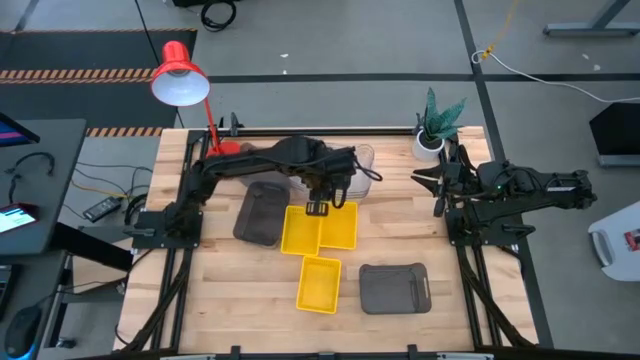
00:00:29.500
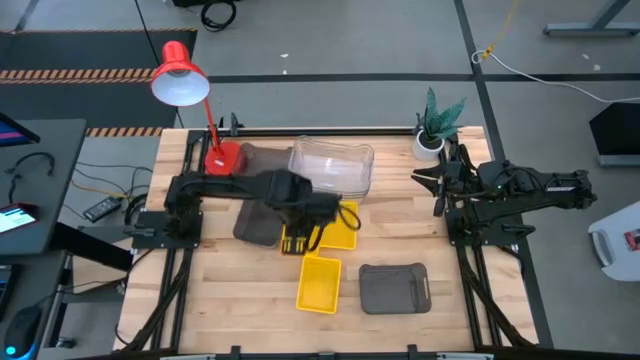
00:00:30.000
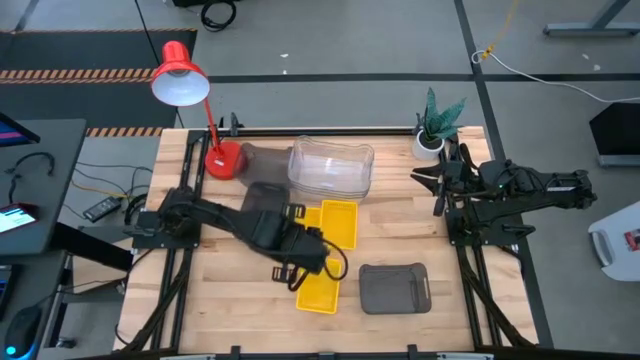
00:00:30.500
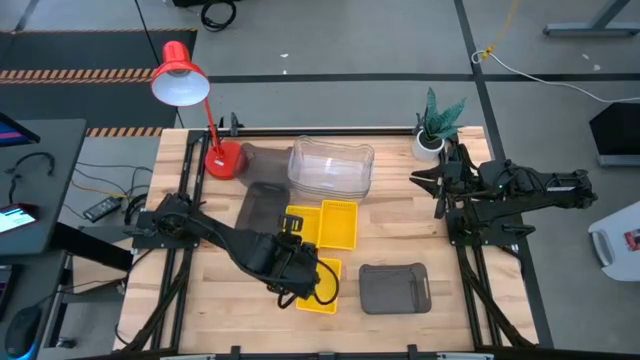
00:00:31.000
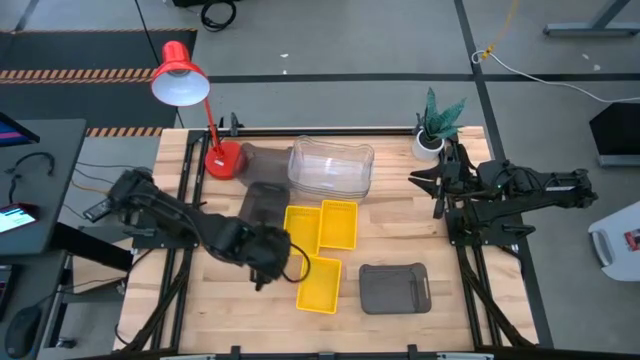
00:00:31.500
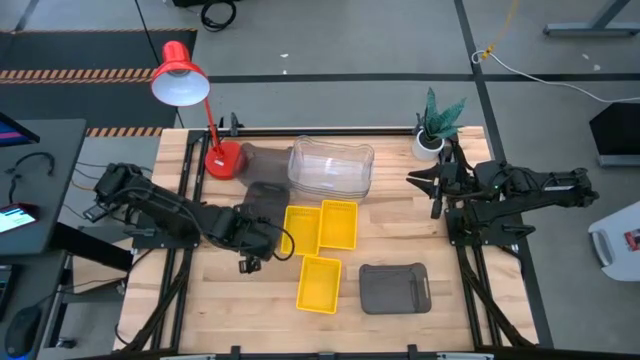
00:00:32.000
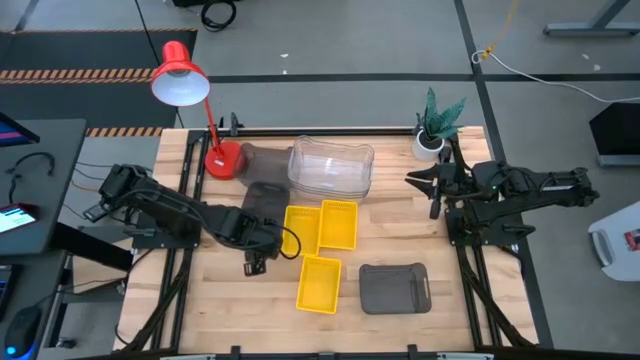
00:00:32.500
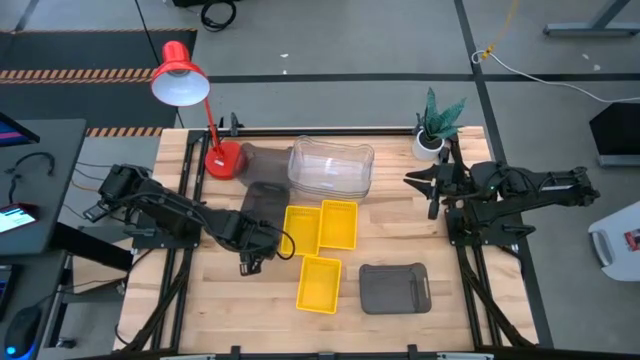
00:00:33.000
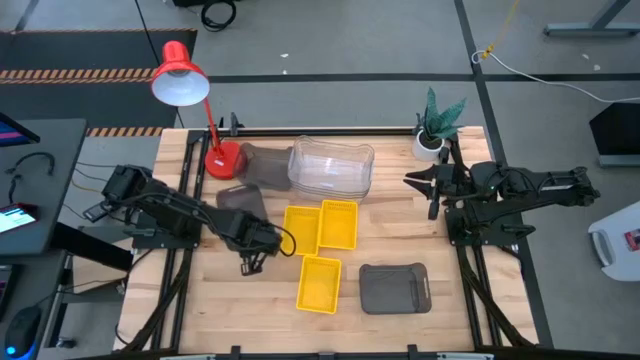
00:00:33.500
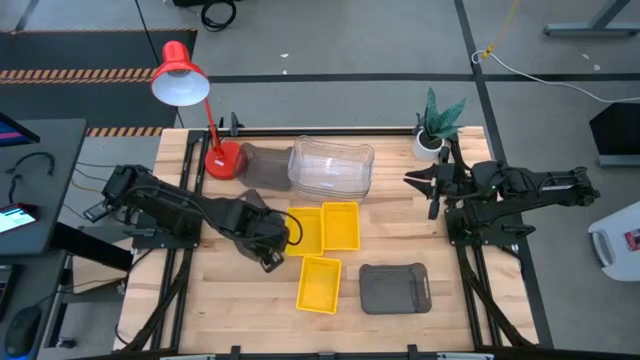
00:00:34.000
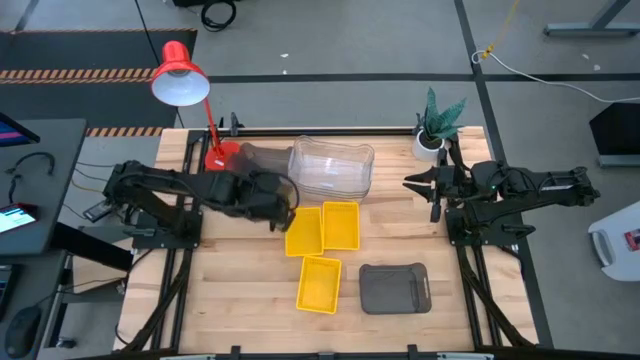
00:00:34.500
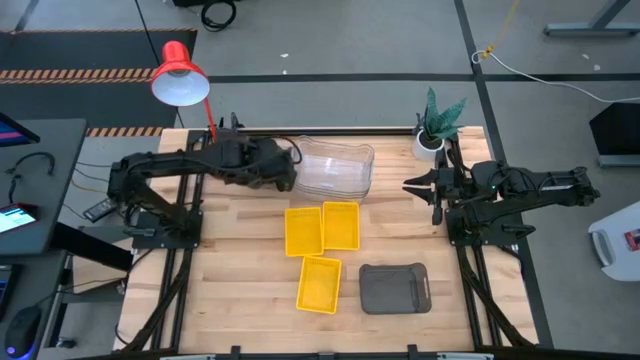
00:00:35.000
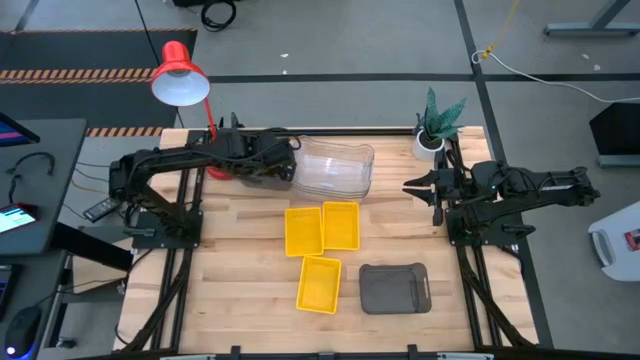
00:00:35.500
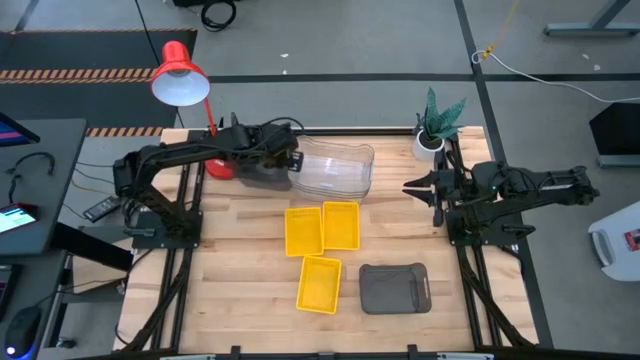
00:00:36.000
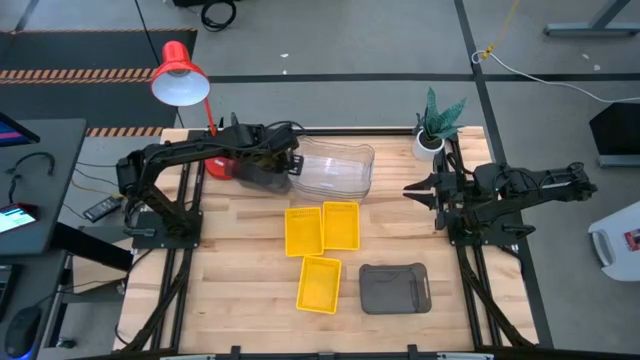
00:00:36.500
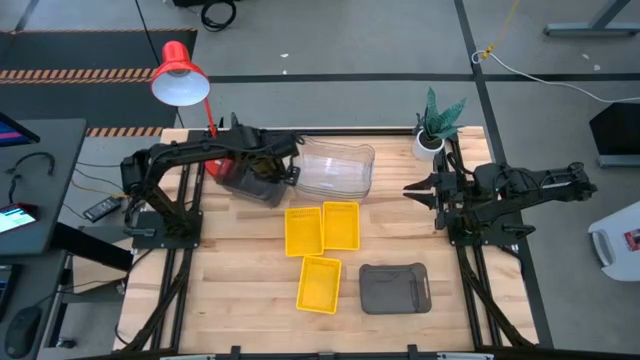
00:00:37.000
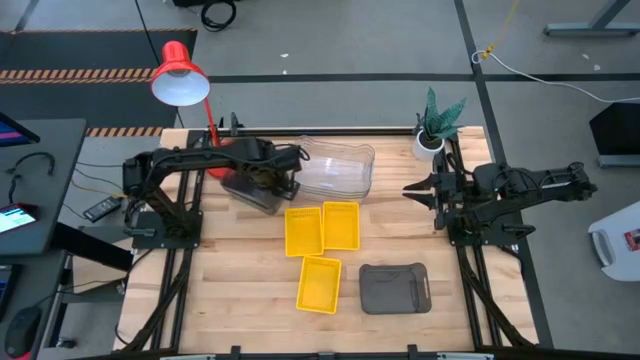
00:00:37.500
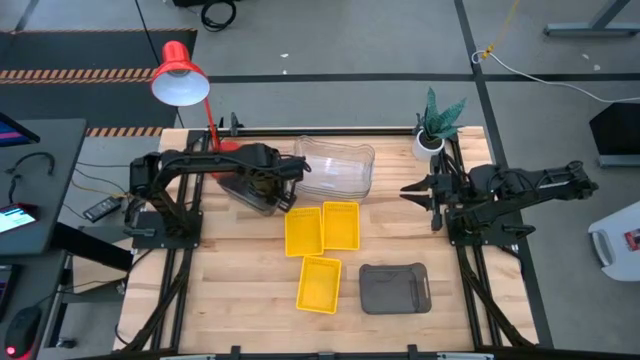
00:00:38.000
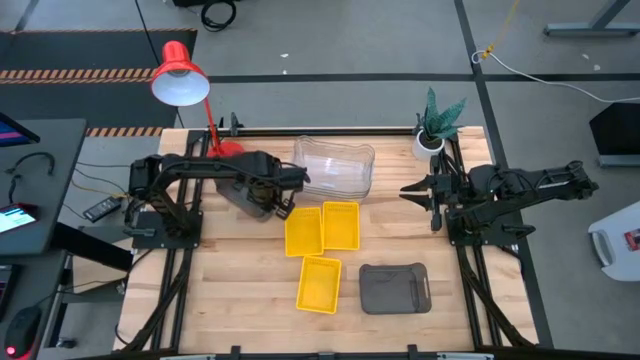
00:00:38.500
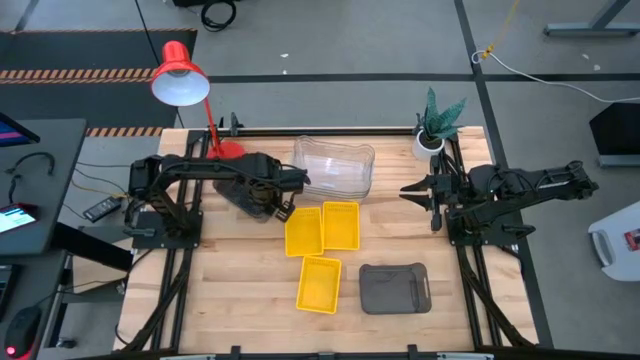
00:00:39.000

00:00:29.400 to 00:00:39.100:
Stack the middle left black bin on top of the top black bin

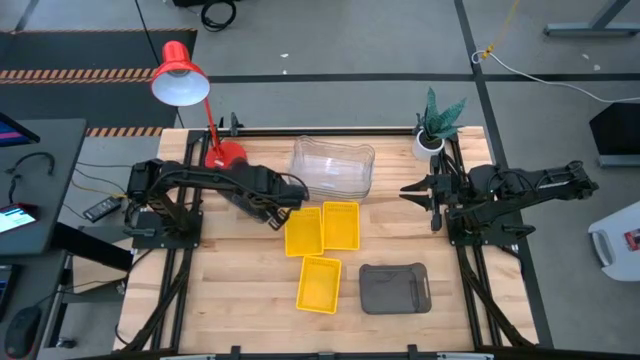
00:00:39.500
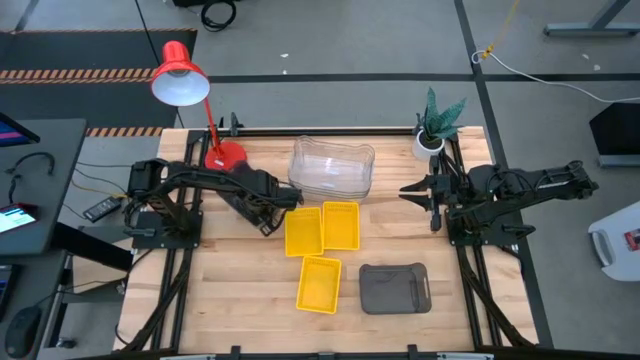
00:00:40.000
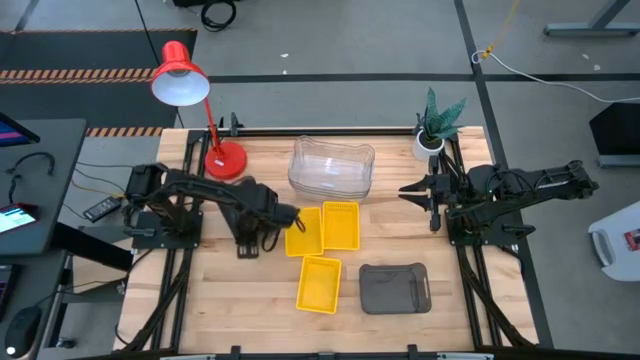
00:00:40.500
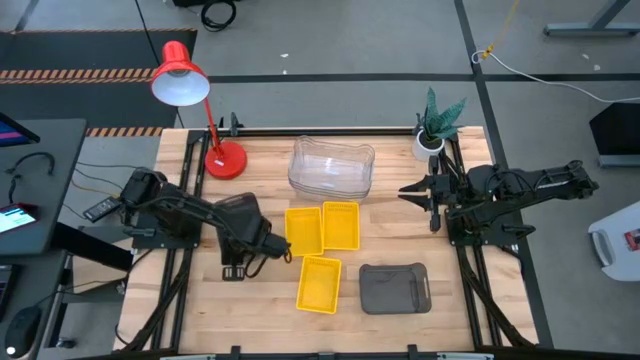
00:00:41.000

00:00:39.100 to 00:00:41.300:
Move the stacked black bins from the top left to the left of the table

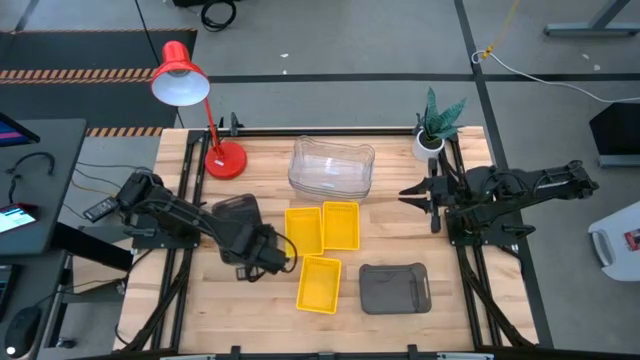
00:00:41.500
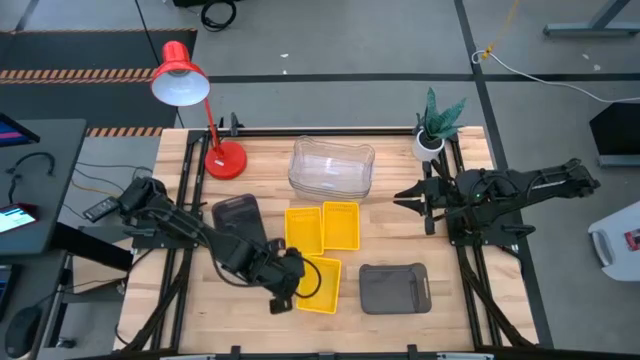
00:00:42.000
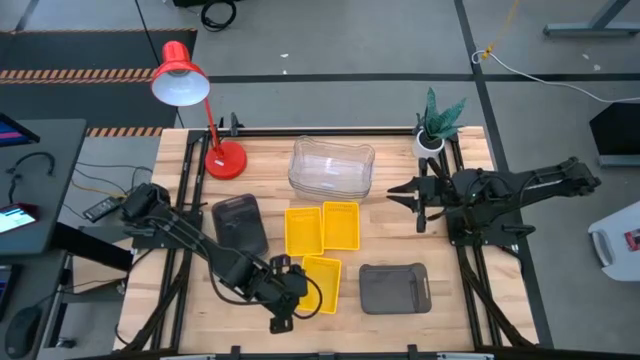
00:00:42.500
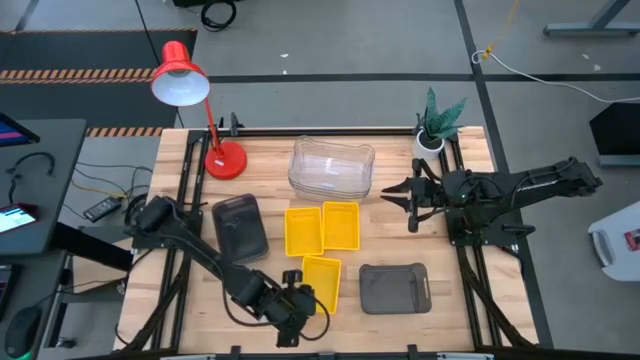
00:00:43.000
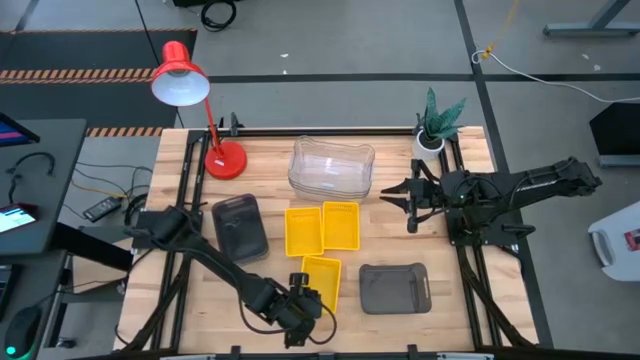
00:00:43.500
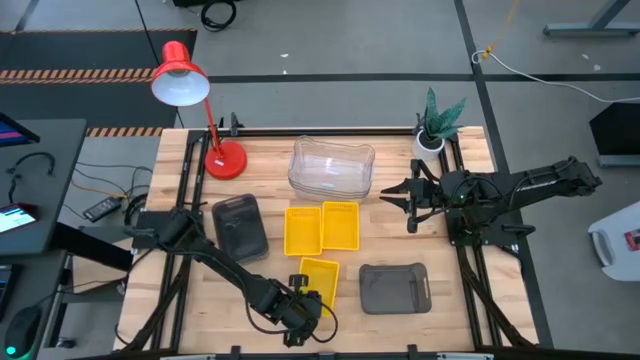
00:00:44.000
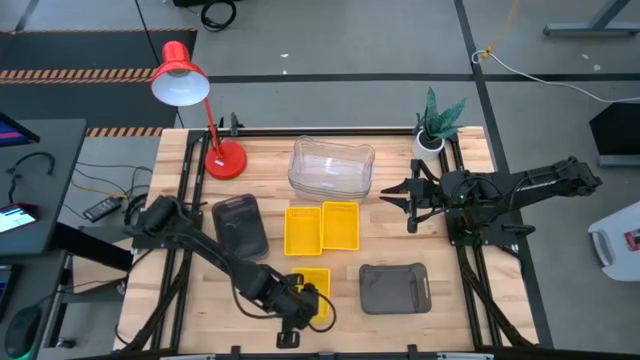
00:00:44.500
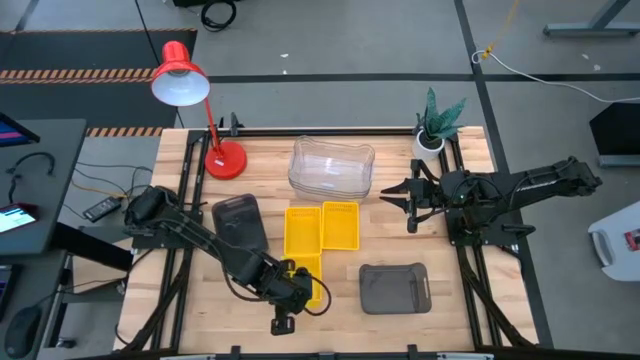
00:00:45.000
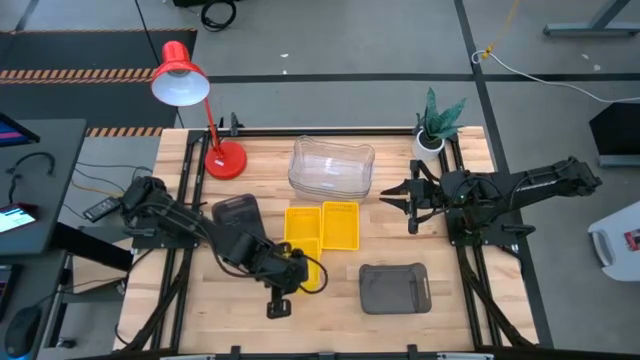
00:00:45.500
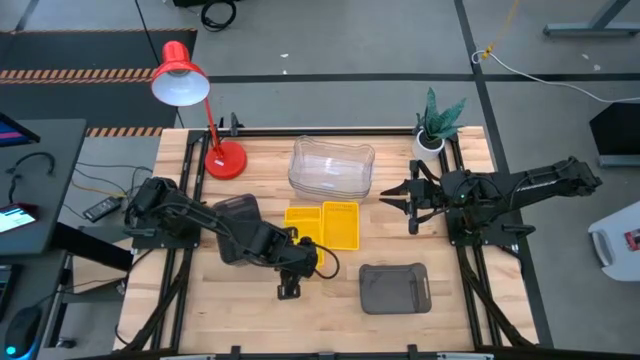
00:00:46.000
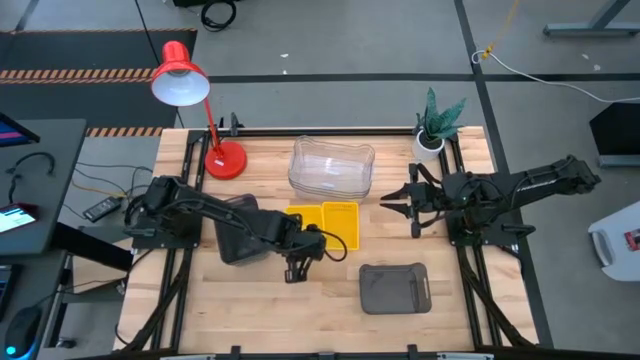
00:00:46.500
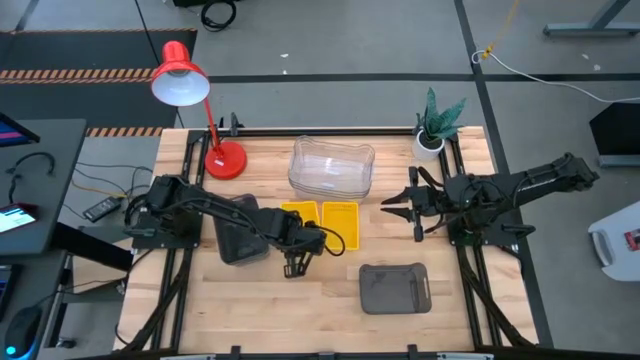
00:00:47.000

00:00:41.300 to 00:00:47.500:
Stack the bottom yellow bin on the top of the left yellow bin

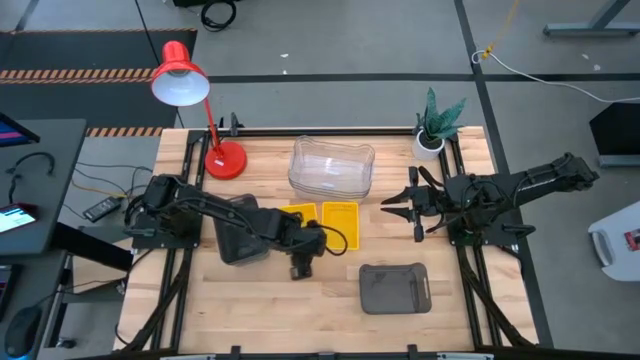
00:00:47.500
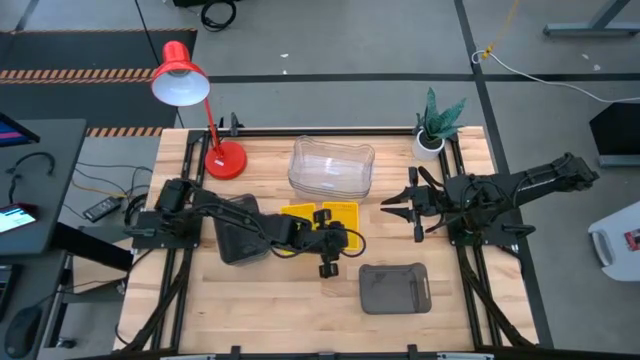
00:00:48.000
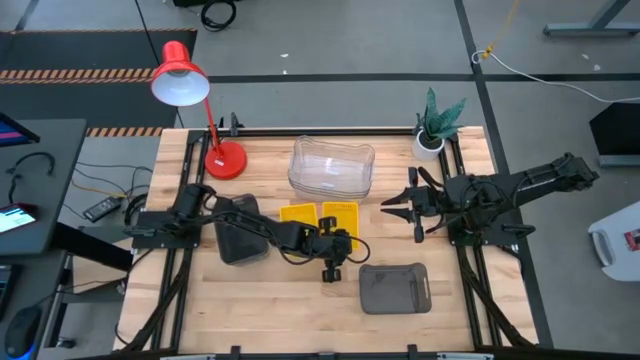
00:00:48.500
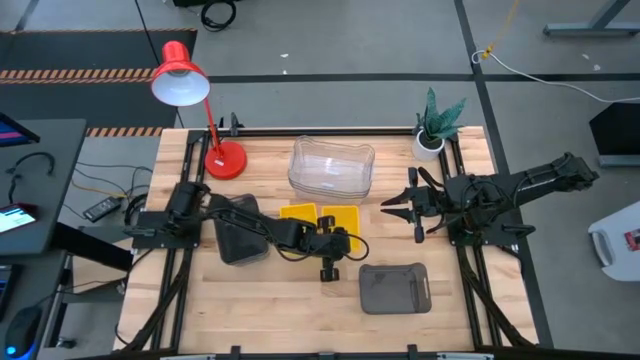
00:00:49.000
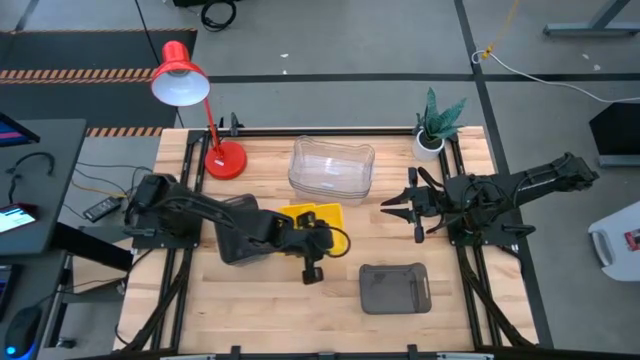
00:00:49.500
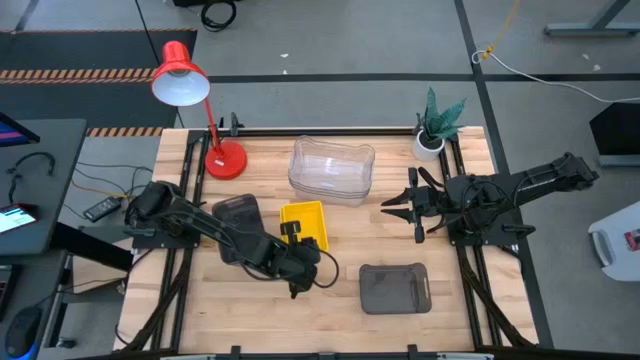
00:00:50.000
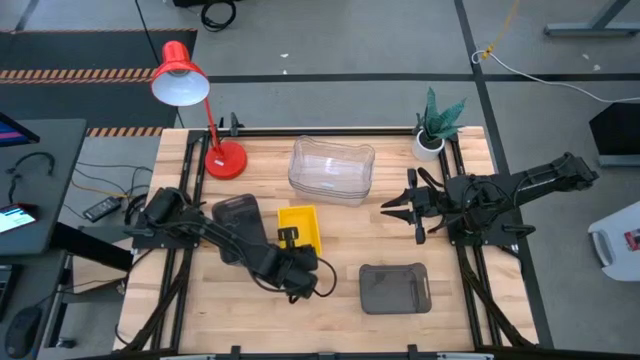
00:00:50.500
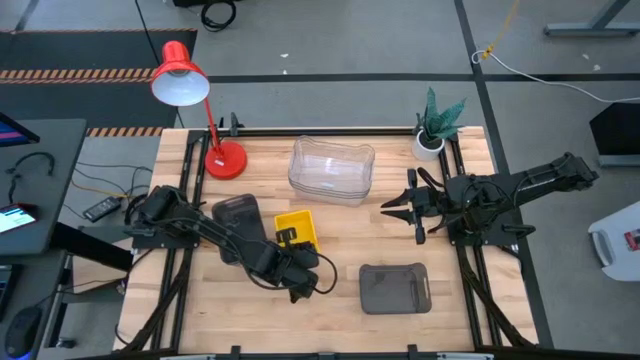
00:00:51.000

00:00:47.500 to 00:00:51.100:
Stack the right yellow bin on the top of the stacked yellow bins
